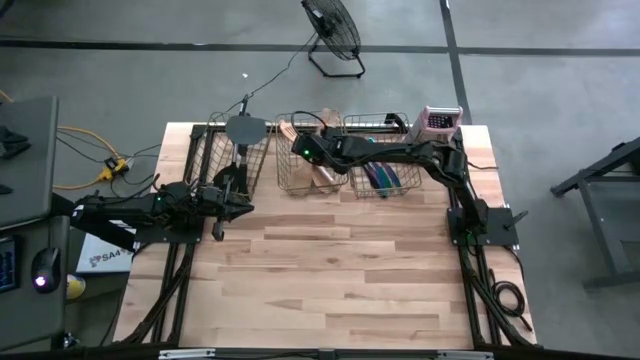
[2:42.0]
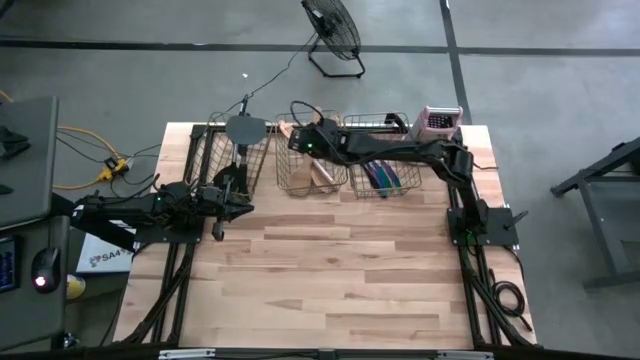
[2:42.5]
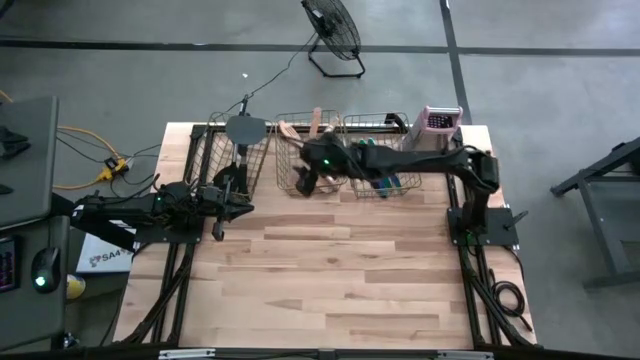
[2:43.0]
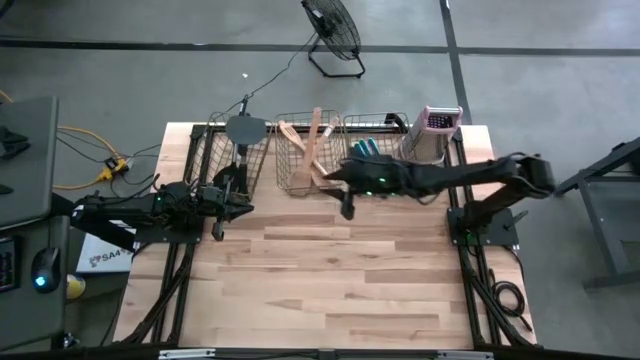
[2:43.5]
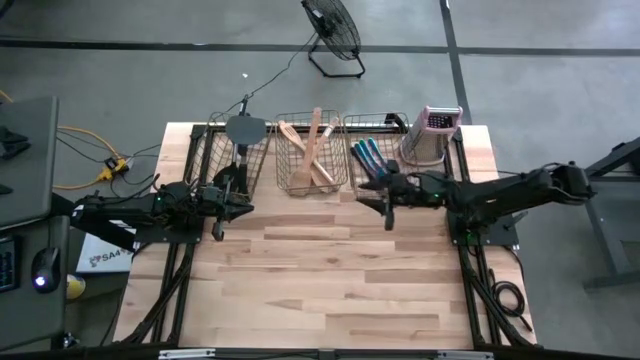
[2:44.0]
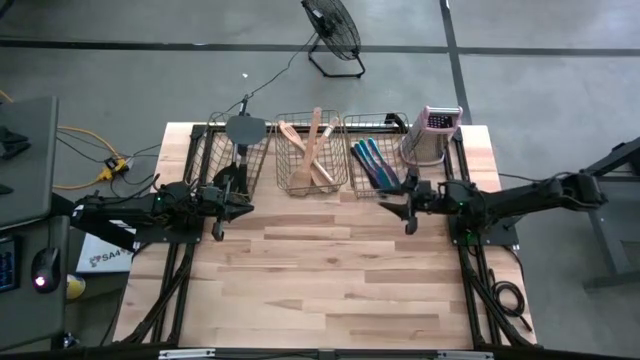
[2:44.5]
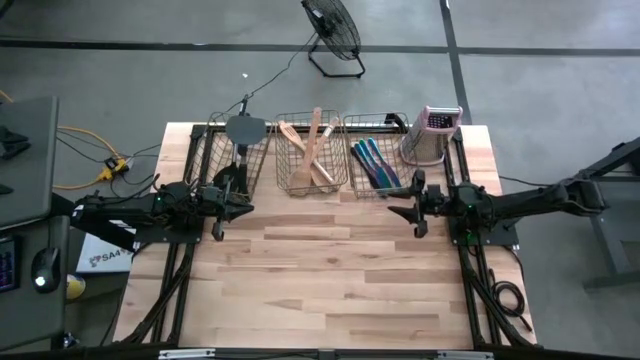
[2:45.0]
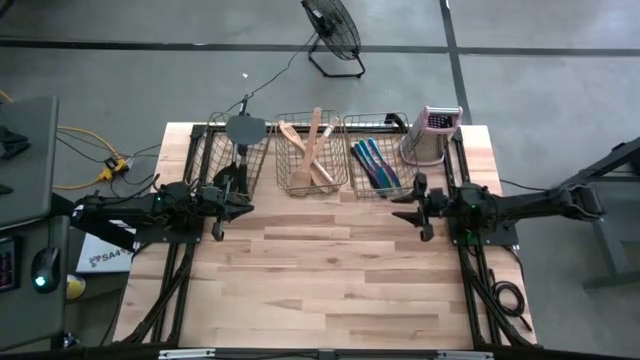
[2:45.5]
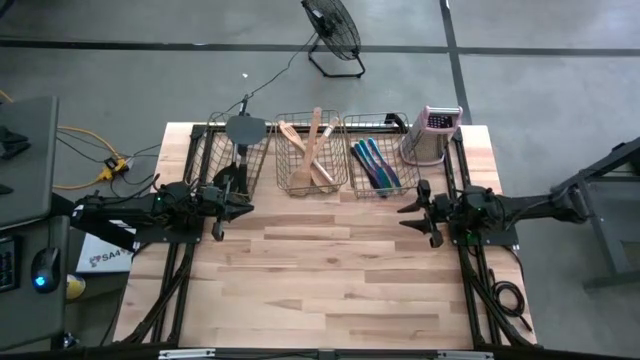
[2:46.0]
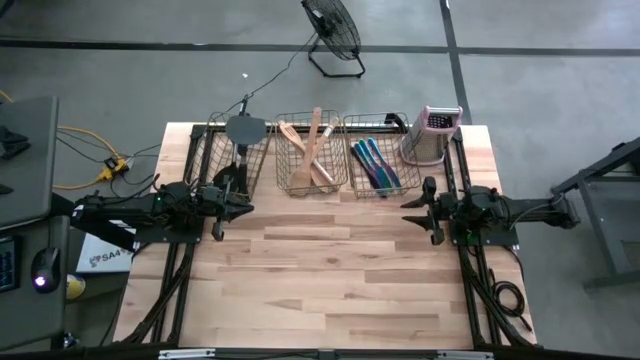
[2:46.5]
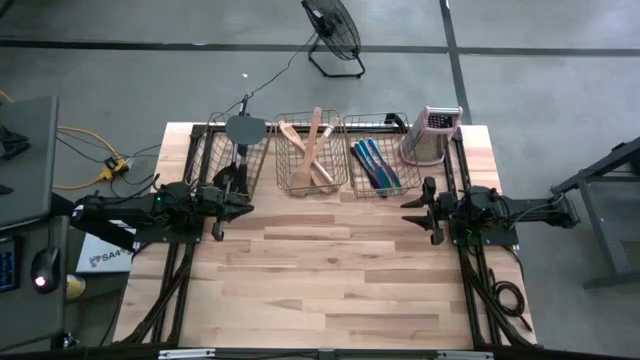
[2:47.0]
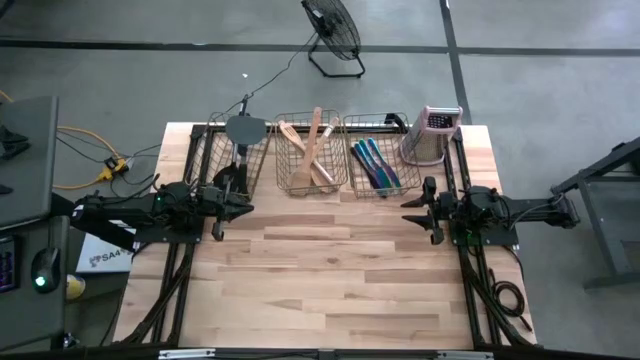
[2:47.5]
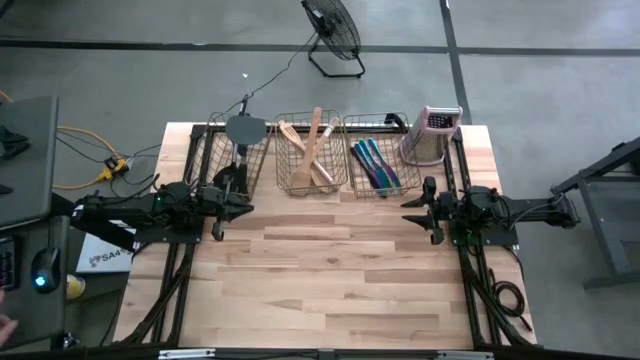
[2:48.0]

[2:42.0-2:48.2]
Task: Pick & Place Kitchen Items
Return to Home Position

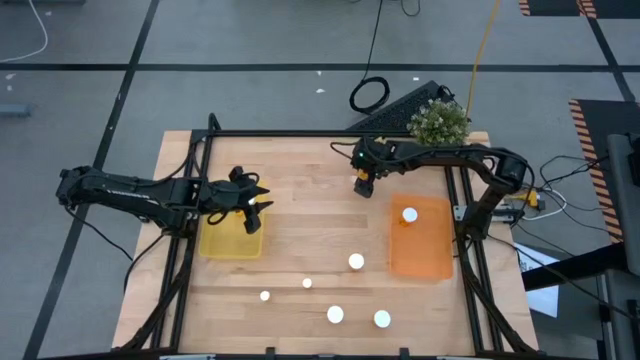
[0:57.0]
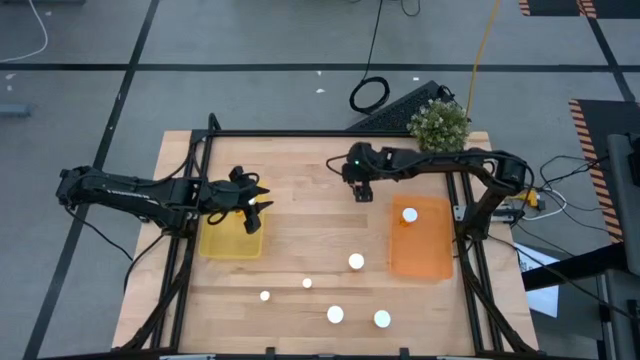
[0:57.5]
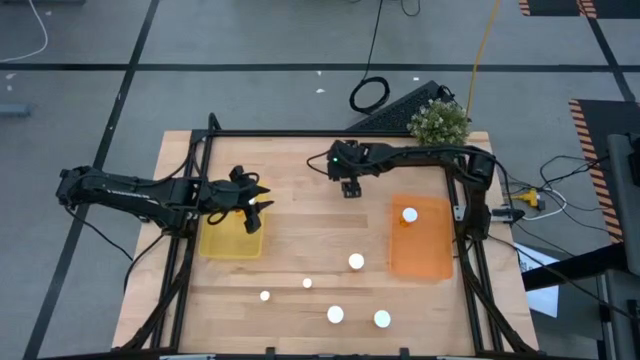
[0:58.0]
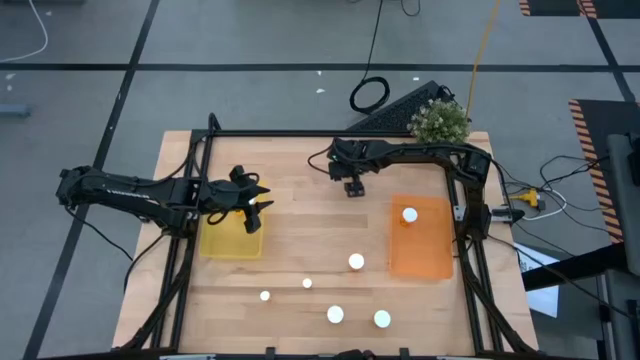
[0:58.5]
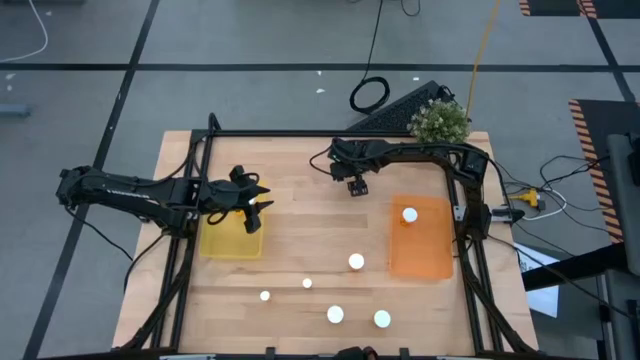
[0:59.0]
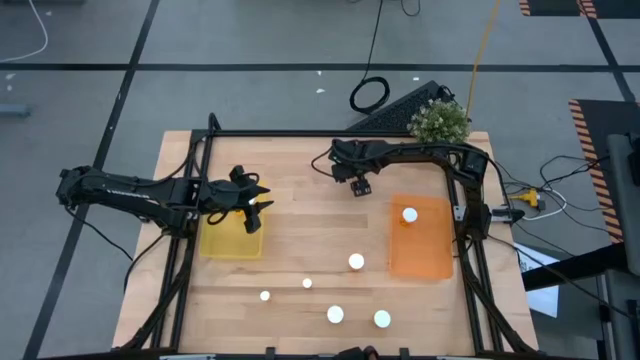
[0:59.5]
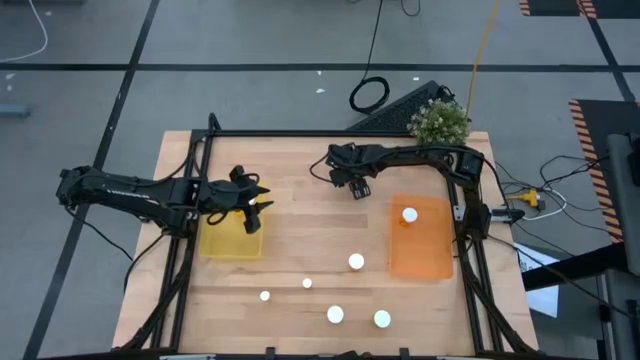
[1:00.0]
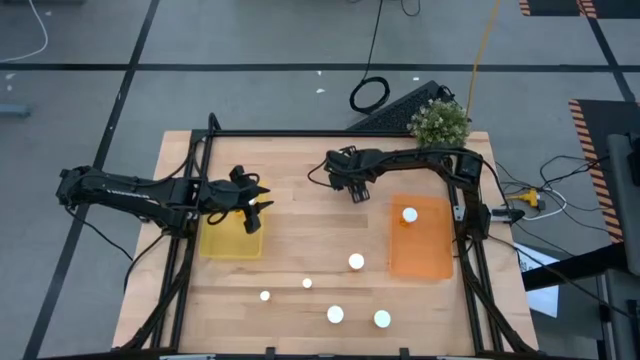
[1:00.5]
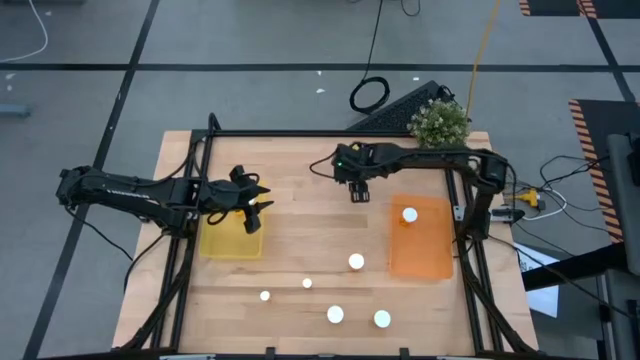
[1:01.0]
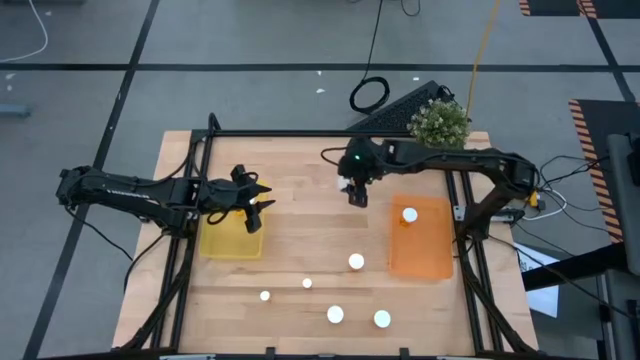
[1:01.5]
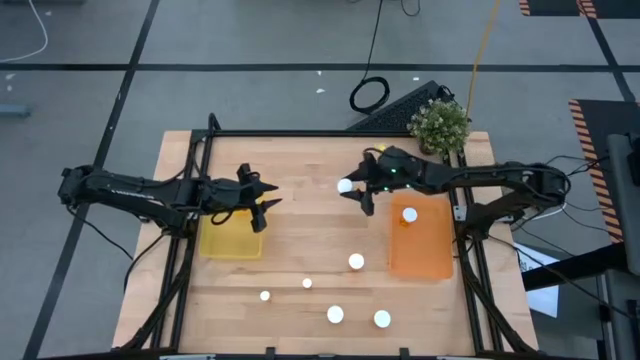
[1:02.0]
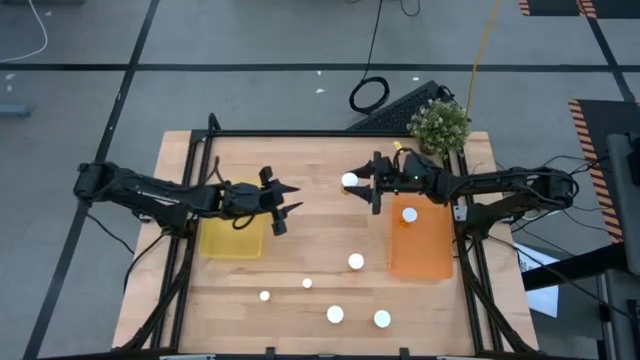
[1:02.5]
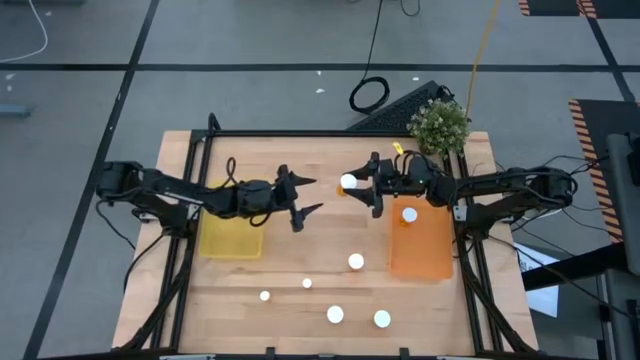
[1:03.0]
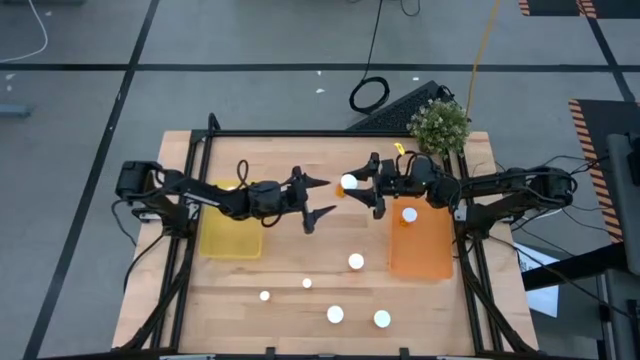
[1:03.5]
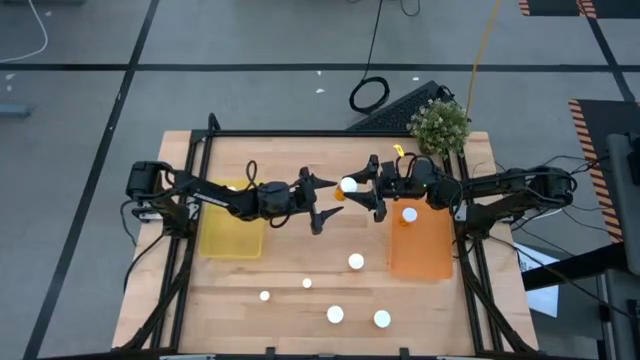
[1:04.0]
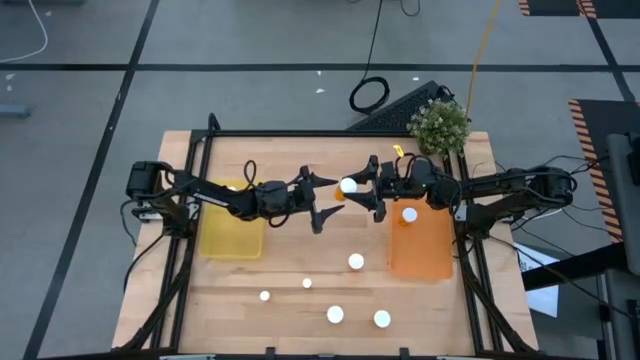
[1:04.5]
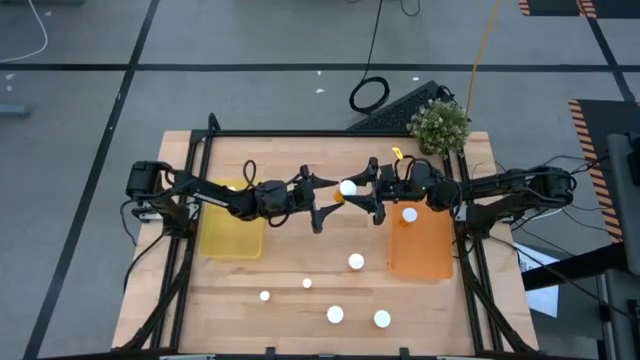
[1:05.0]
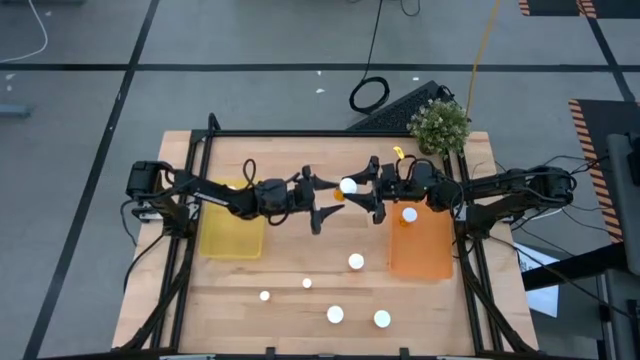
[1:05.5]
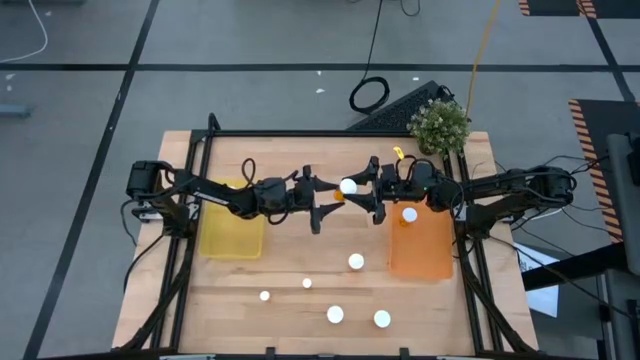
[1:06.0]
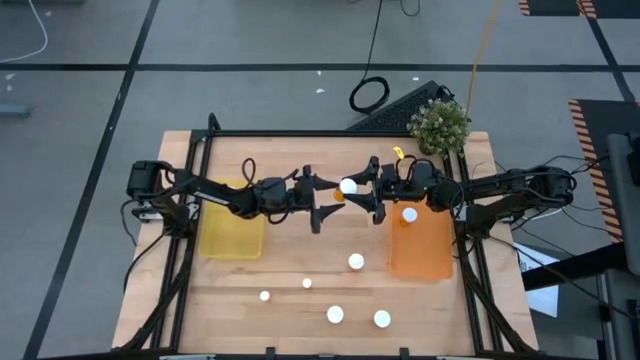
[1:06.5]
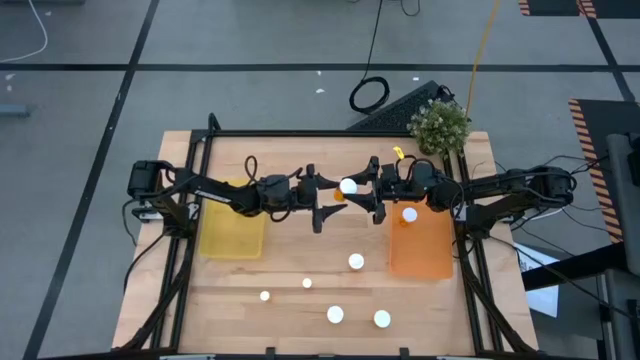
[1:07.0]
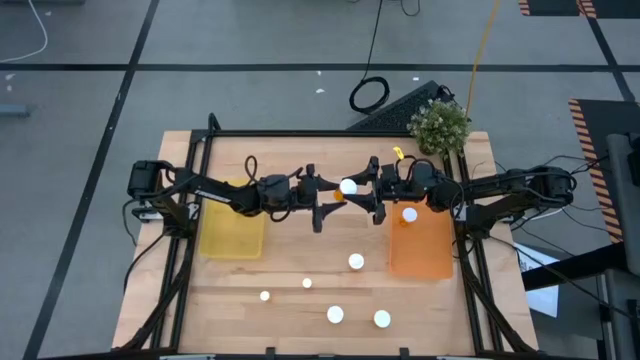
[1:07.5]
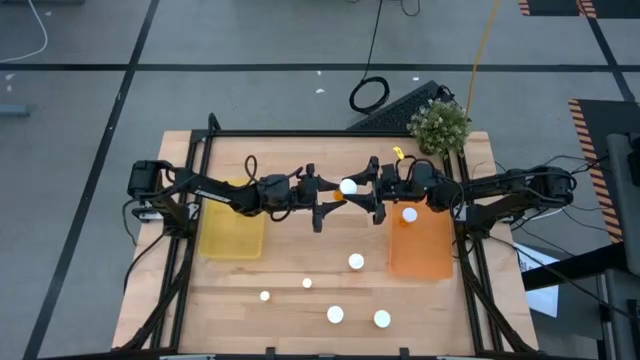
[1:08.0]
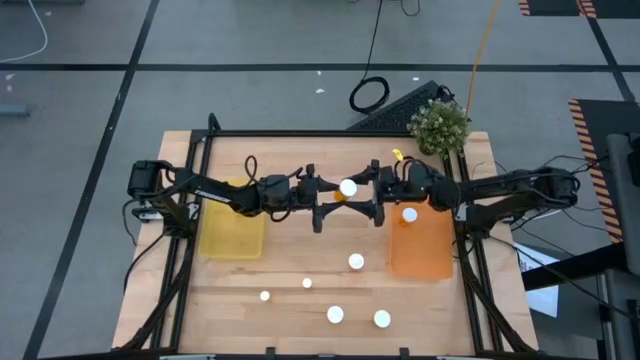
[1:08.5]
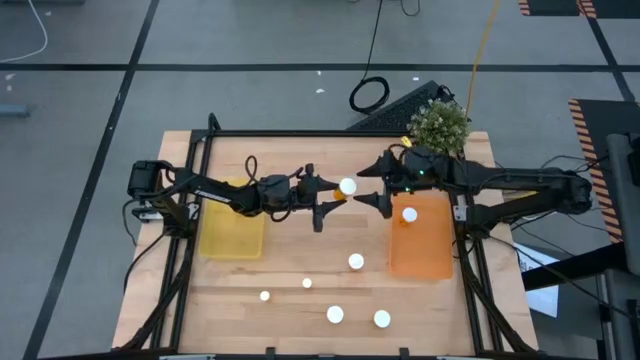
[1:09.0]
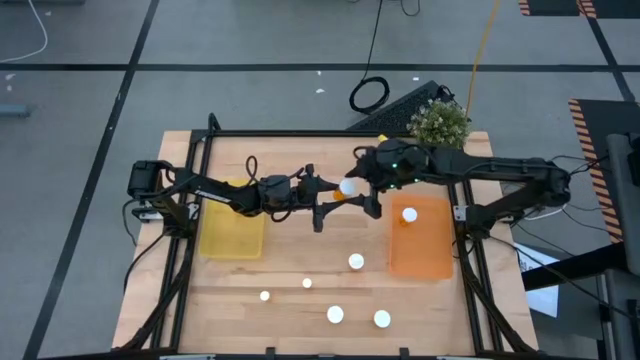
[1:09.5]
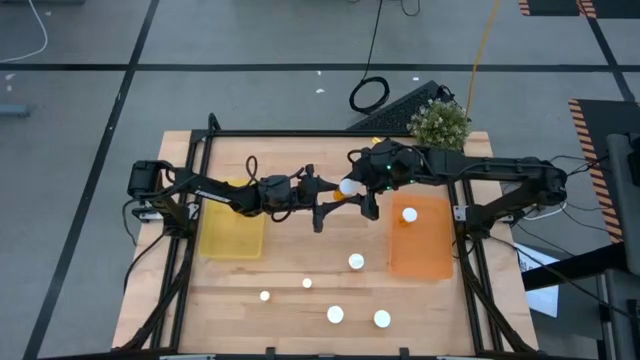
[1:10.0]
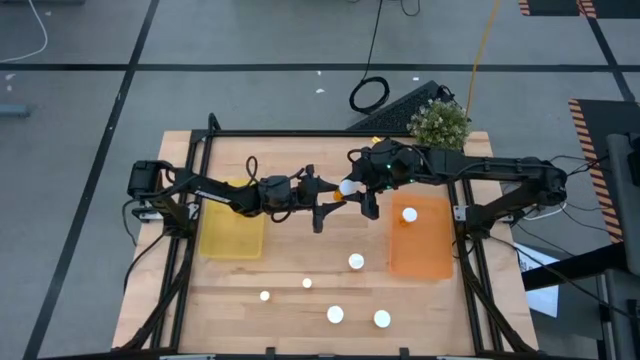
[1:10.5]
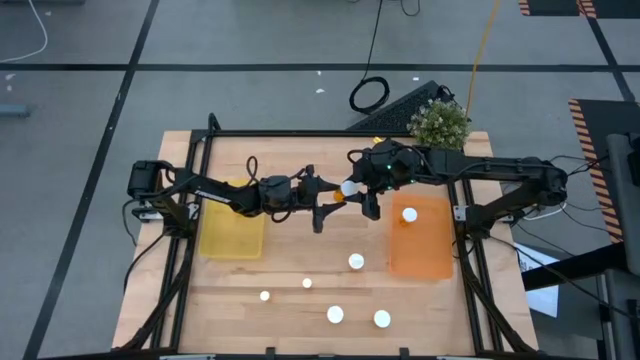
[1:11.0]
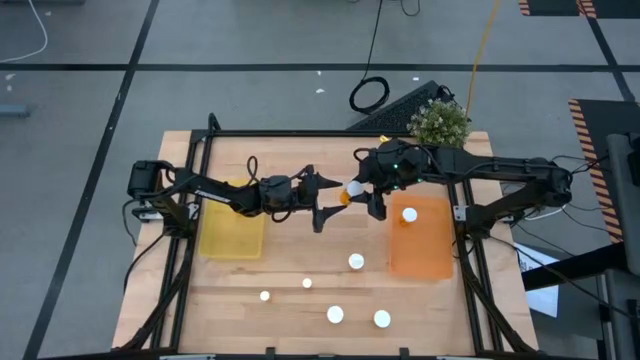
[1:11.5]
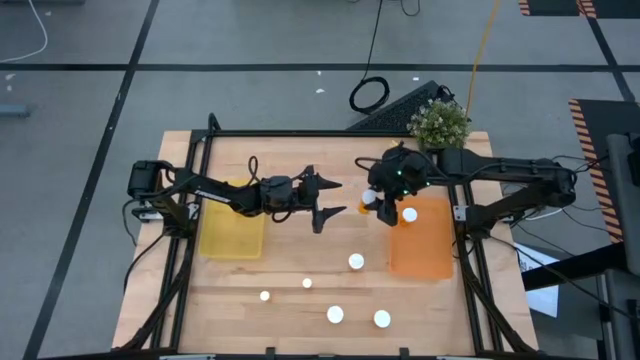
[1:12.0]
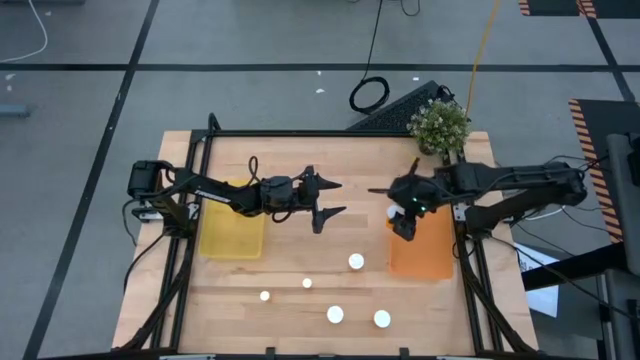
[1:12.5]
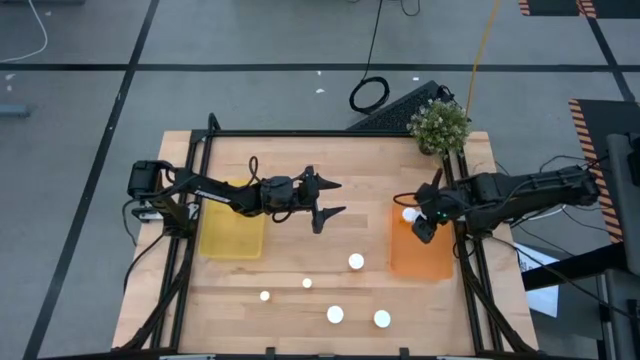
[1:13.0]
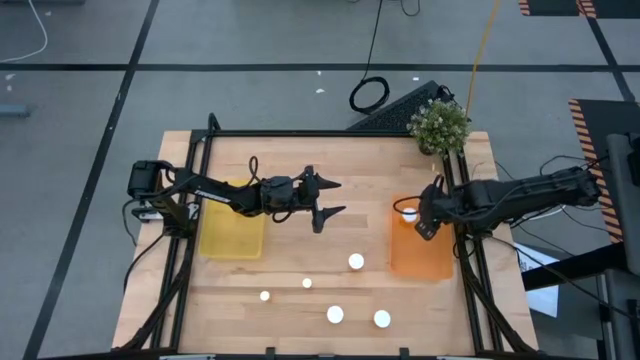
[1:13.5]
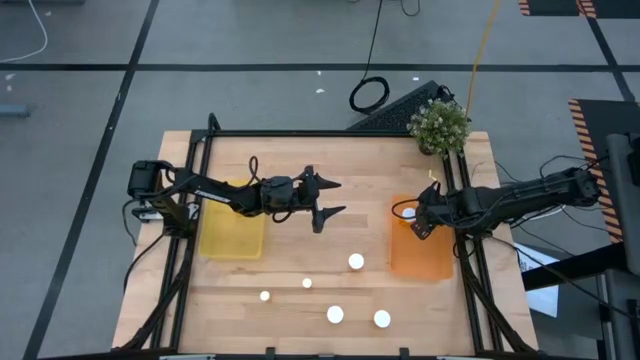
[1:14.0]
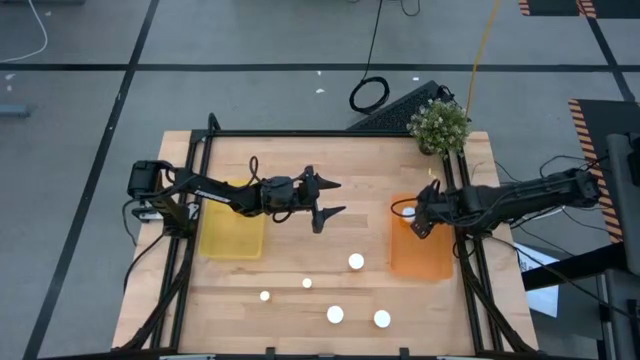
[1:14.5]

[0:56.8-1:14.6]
Task: Pick and place medicine bottles into bin by pill shape (circle, oval)
Put the large orange pill bottle into the orange bin
